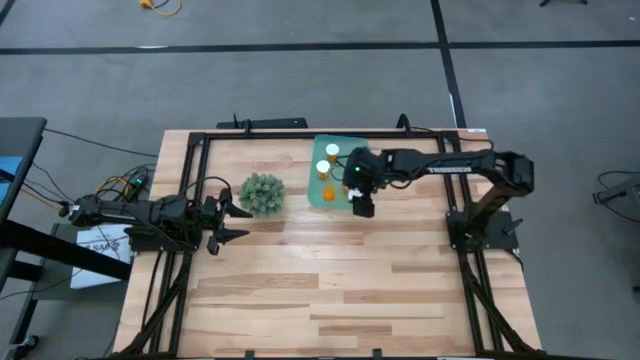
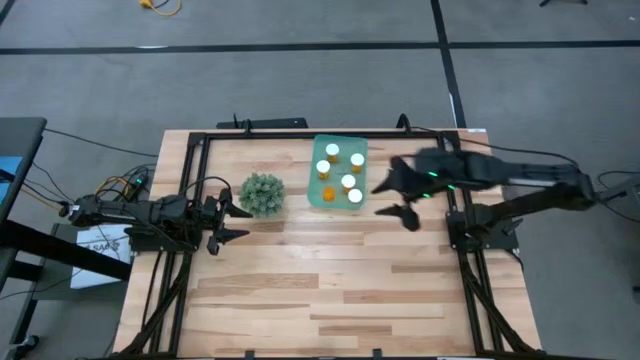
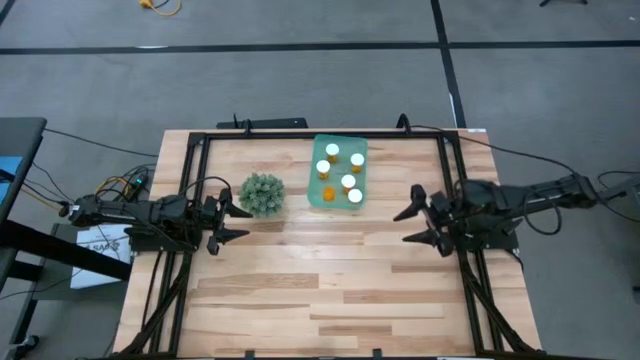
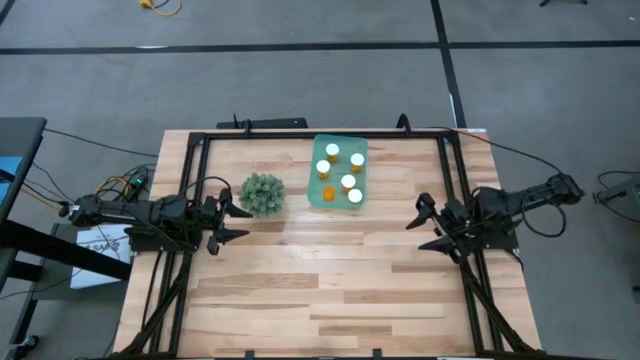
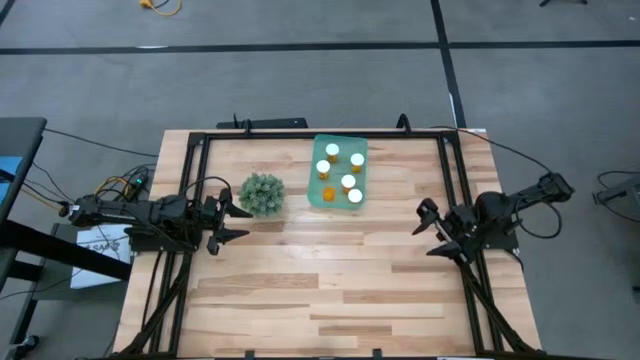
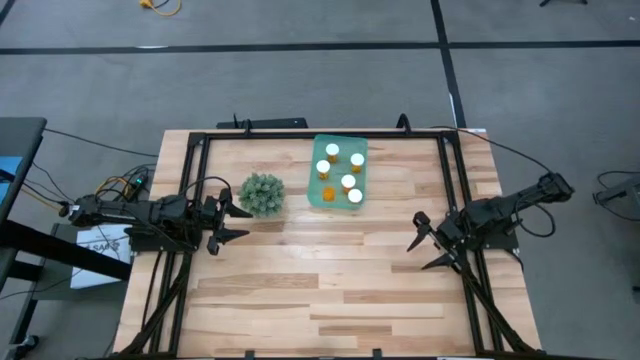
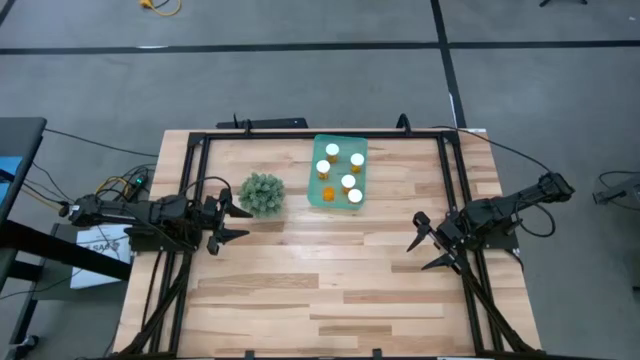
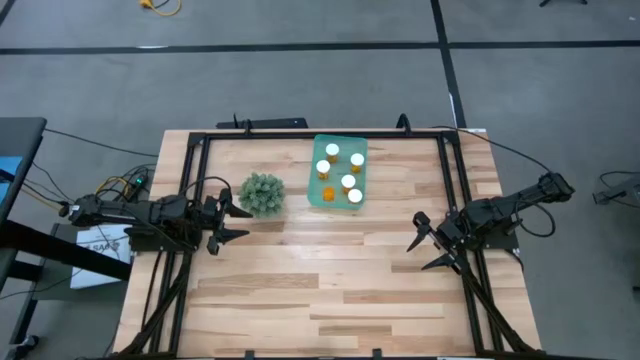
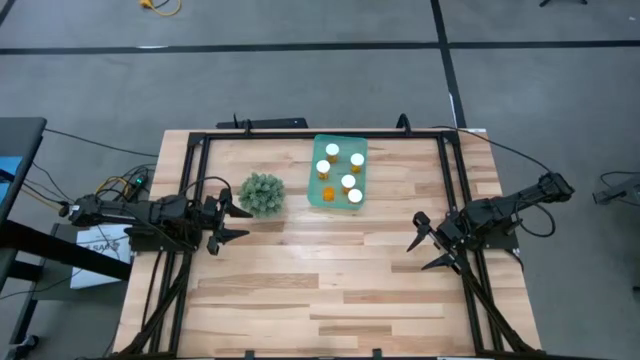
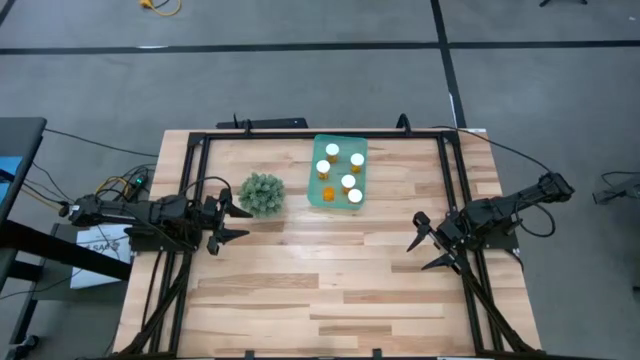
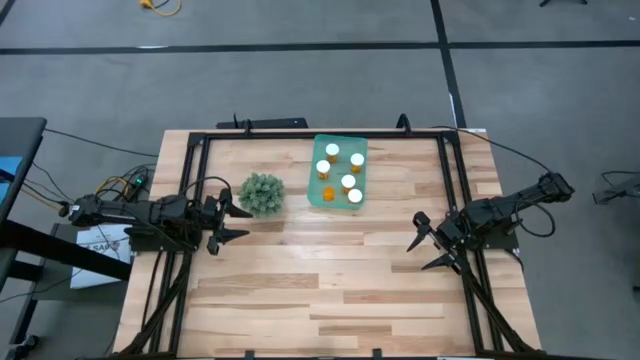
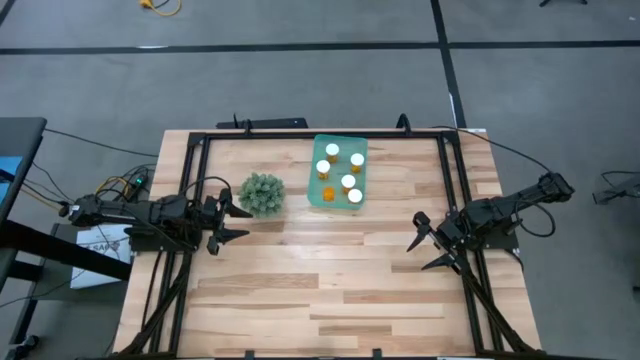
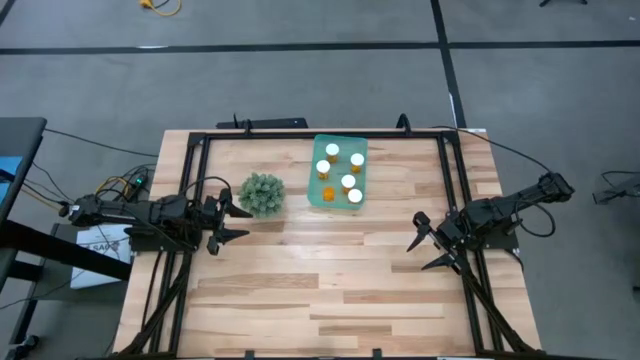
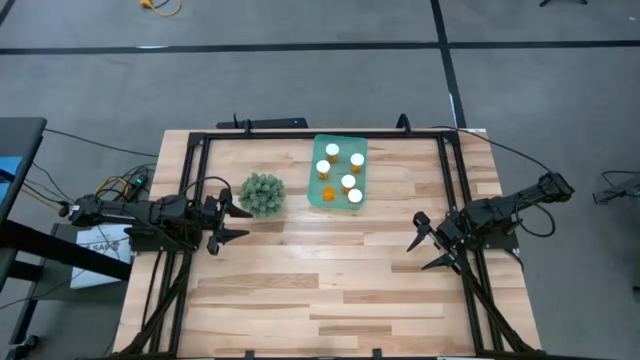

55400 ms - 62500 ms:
Task: Pick and place pill bottles into a basket
Return to Home Position

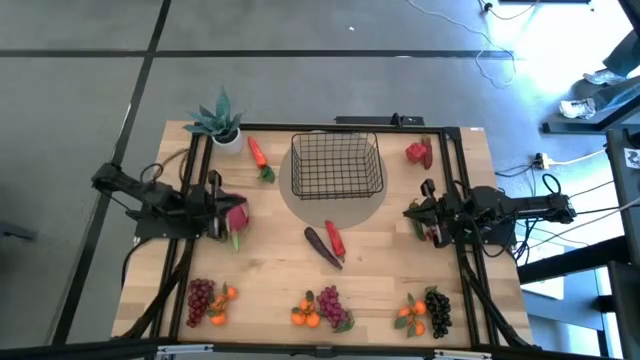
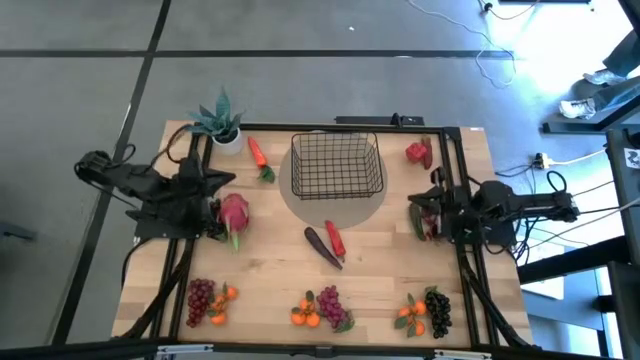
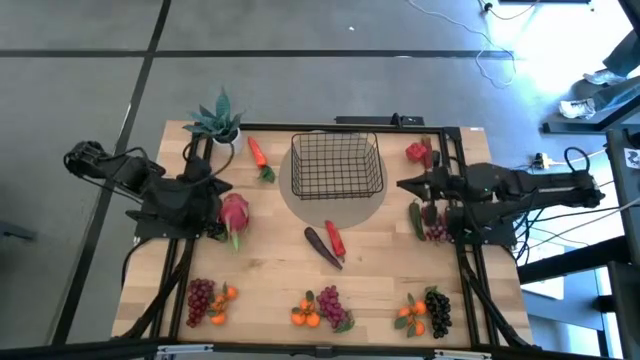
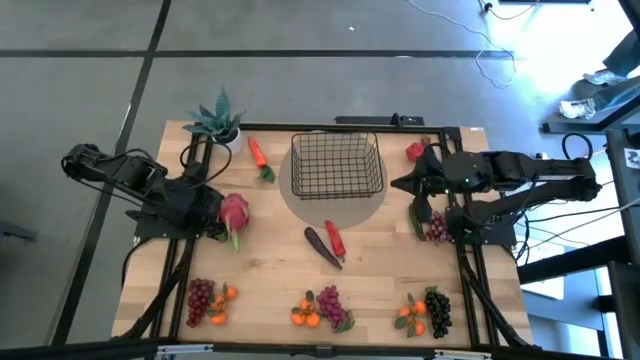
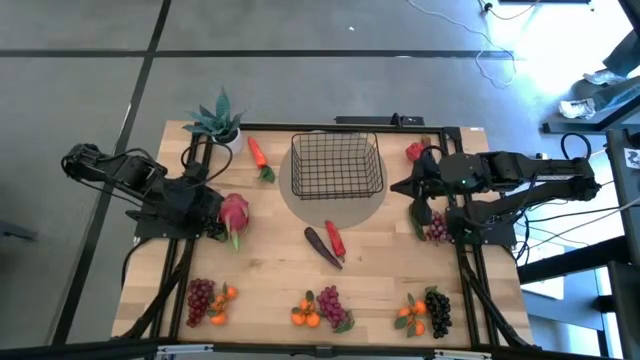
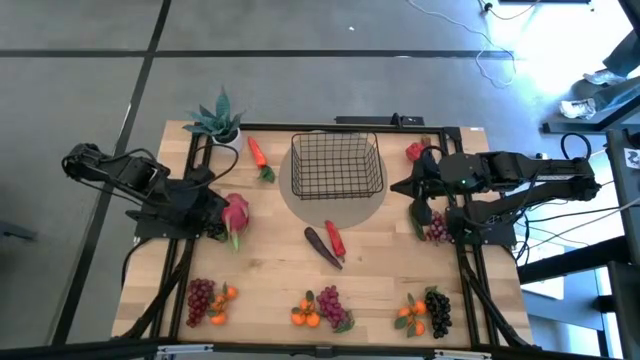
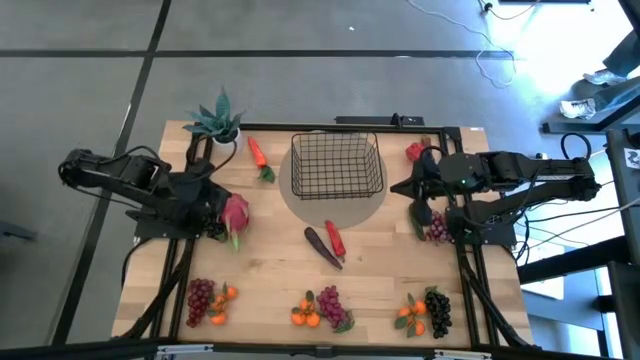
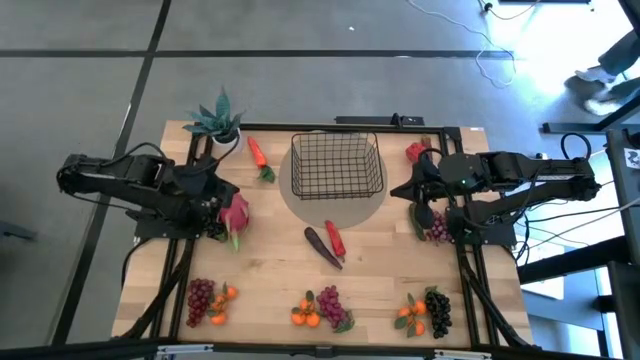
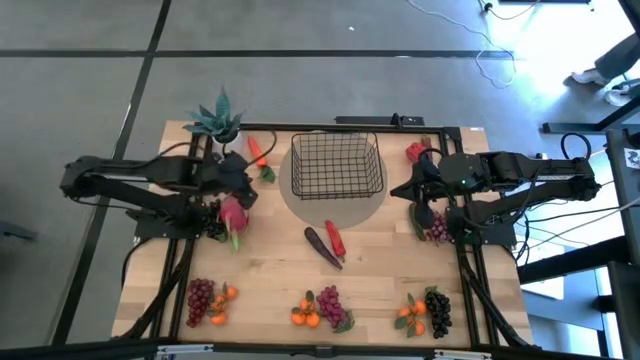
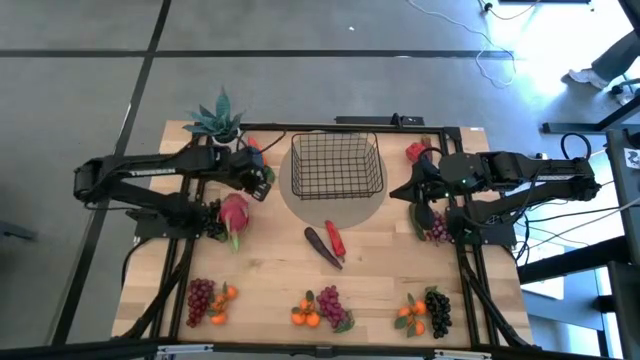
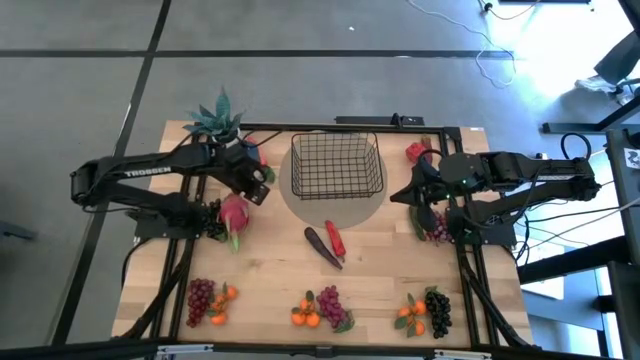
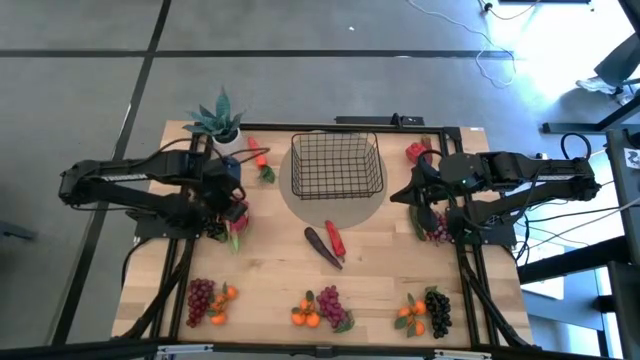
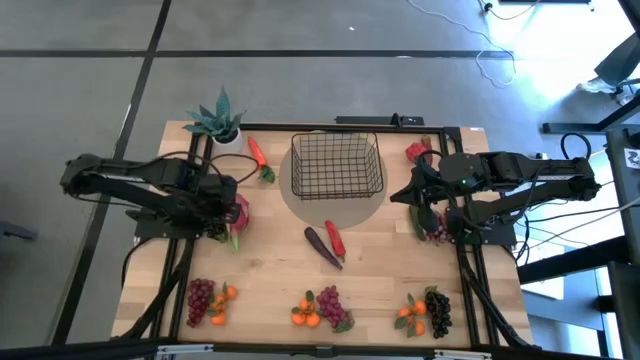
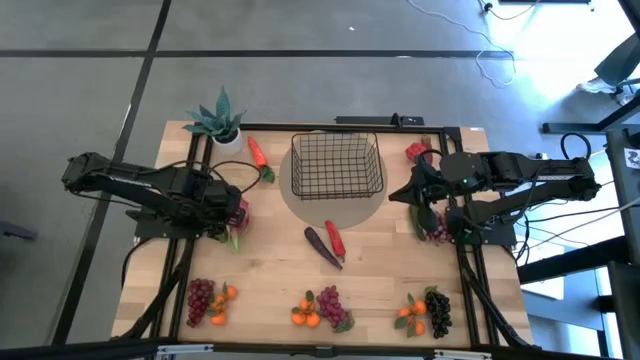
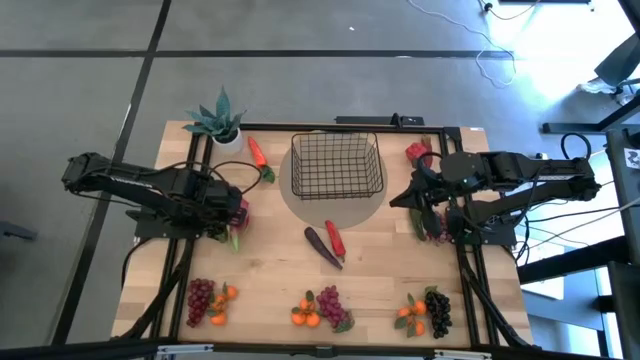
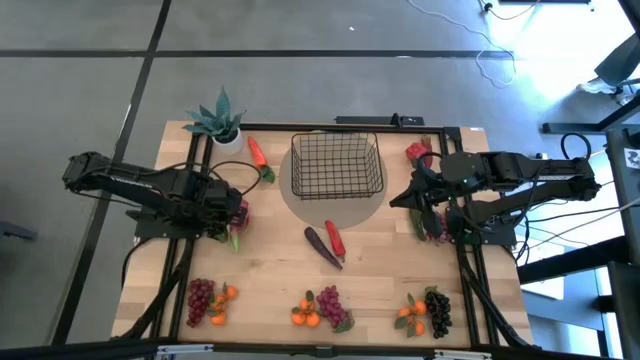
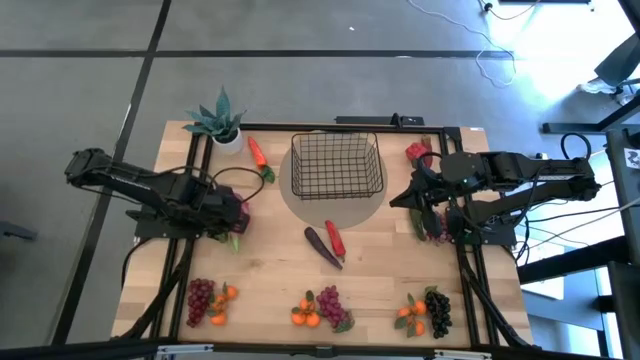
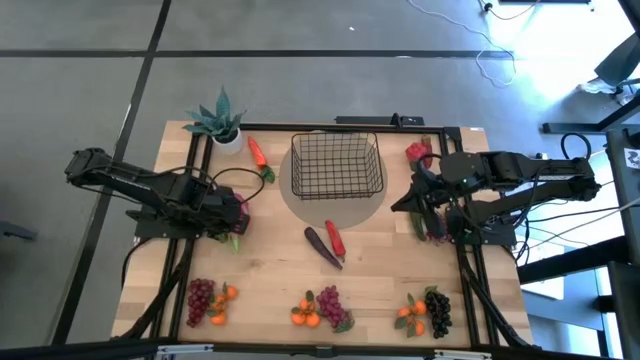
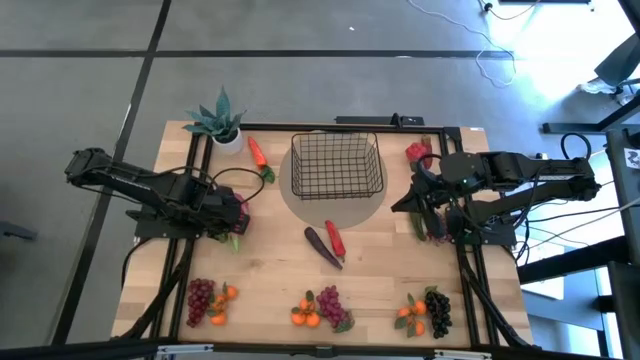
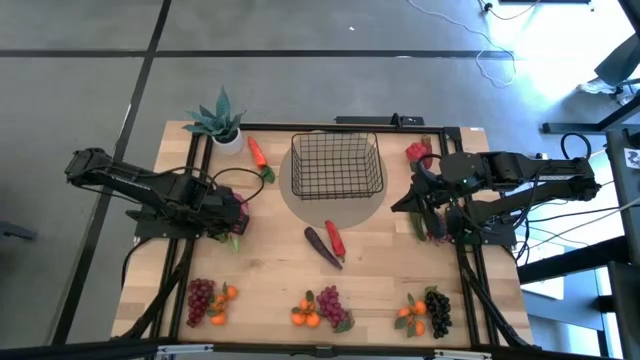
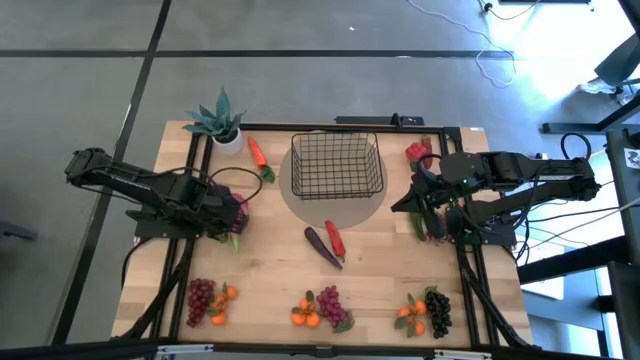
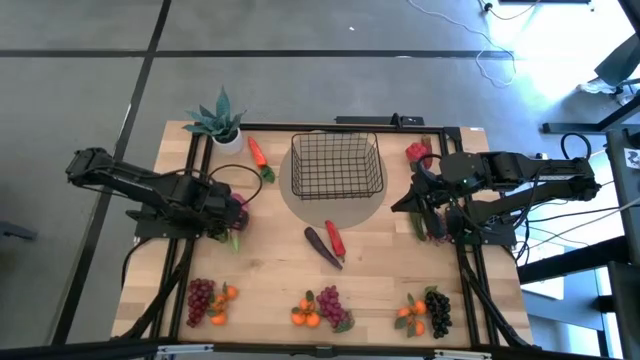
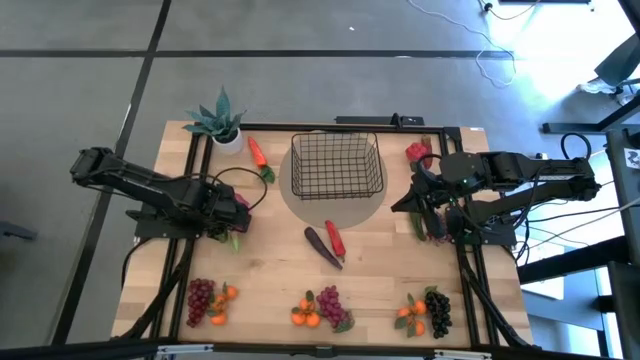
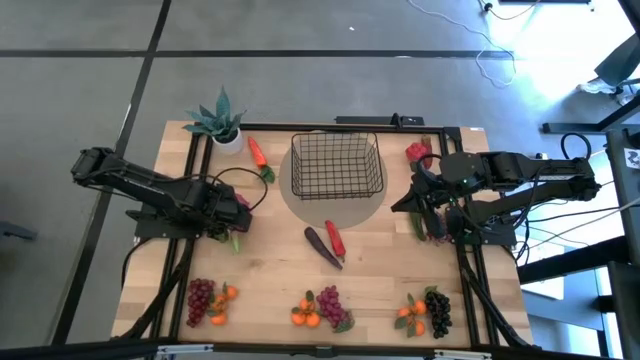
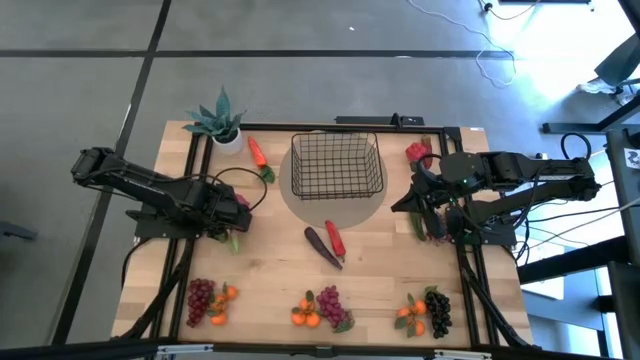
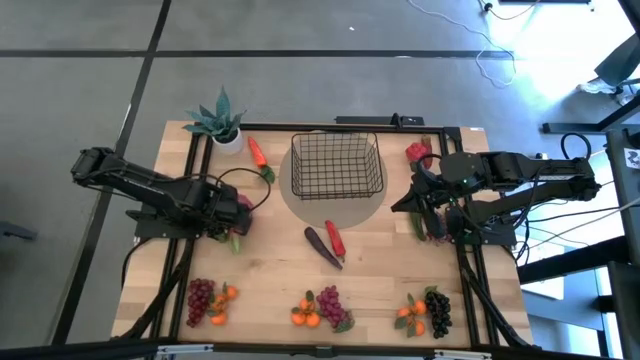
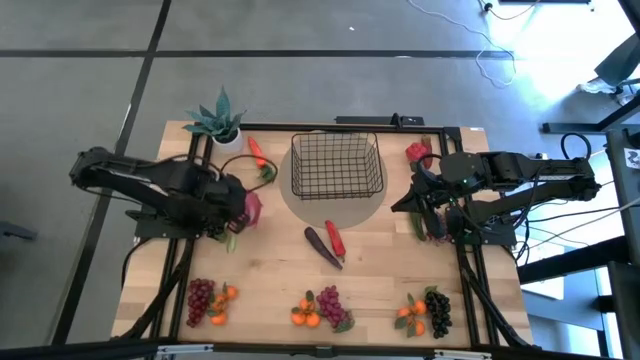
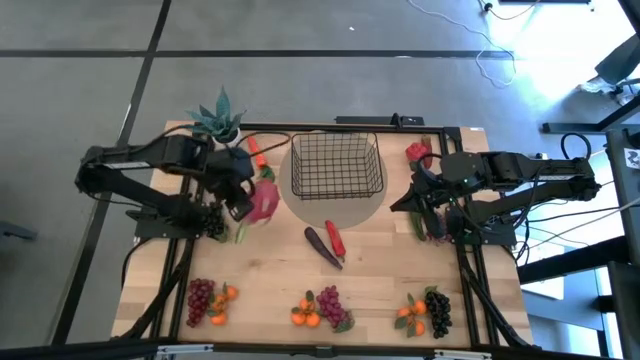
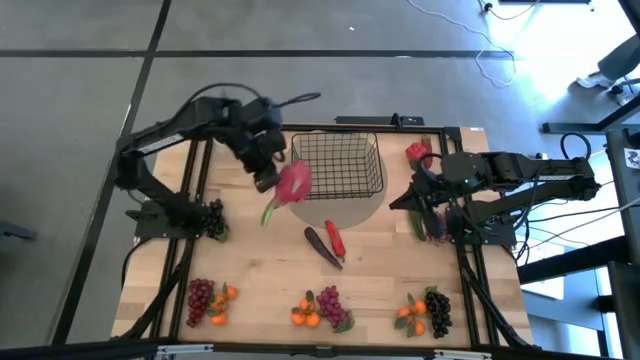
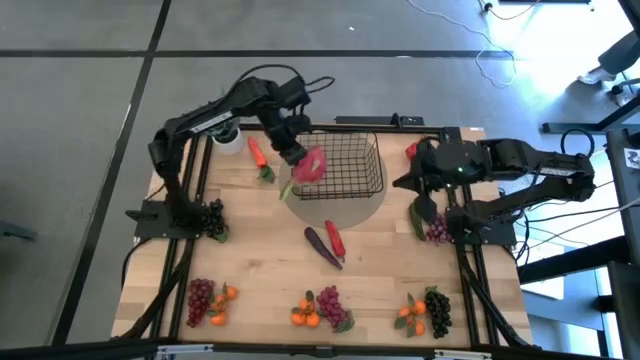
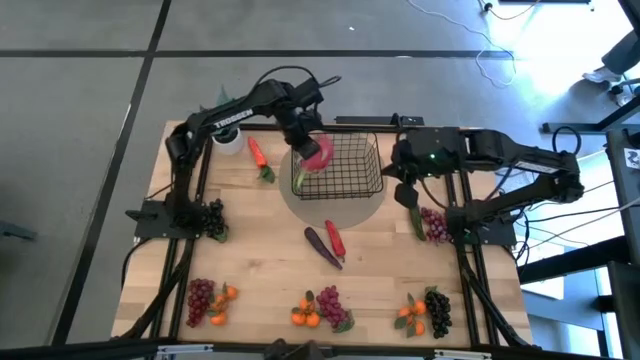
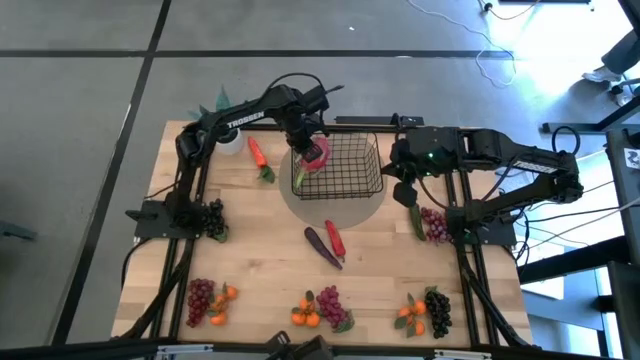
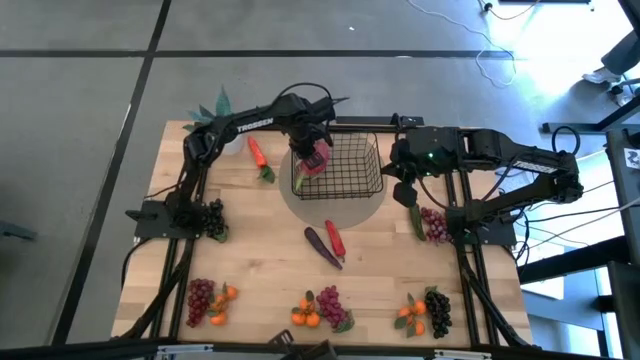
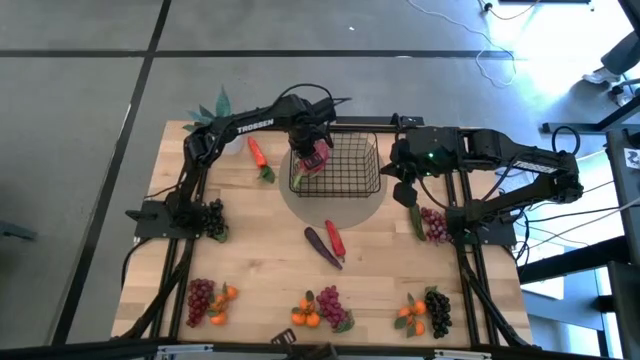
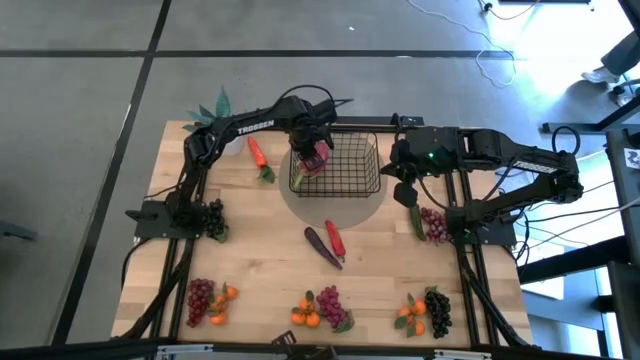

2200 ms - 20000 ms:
Task: Build produce basket
Put the red dragon fruit into the black wire basket
